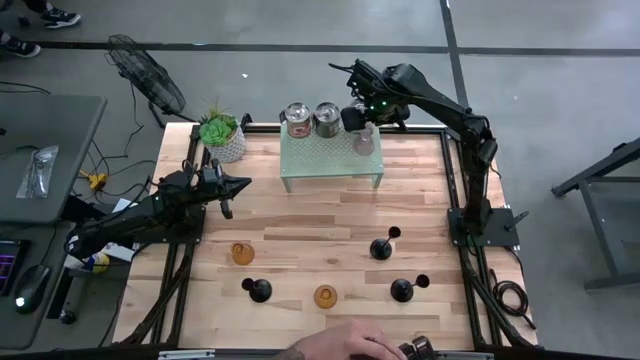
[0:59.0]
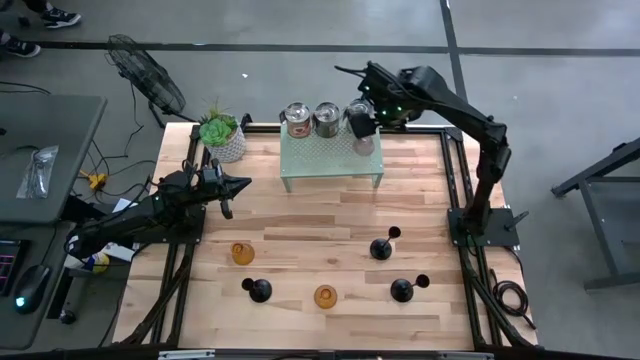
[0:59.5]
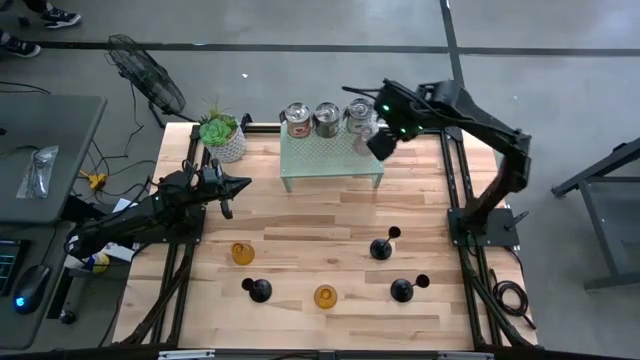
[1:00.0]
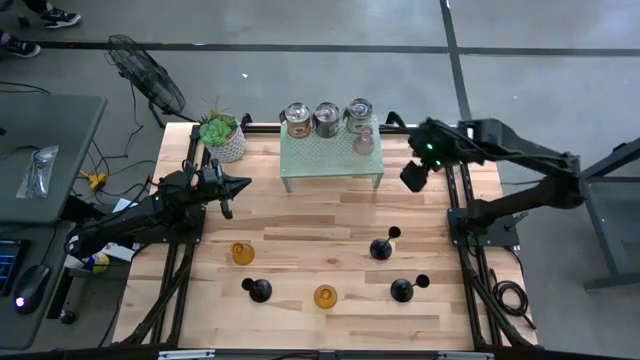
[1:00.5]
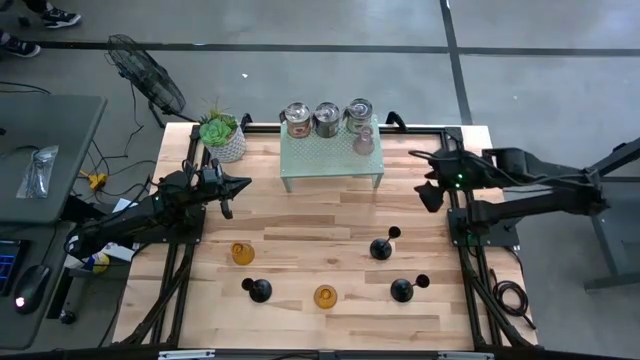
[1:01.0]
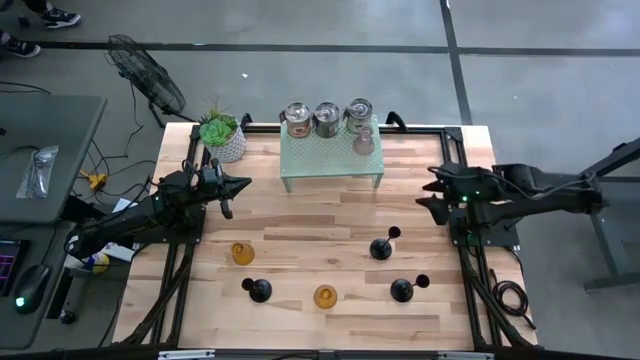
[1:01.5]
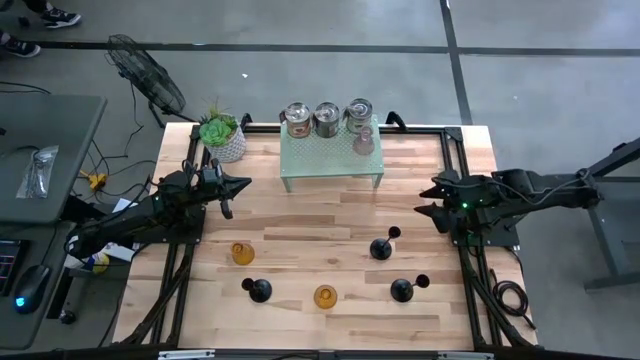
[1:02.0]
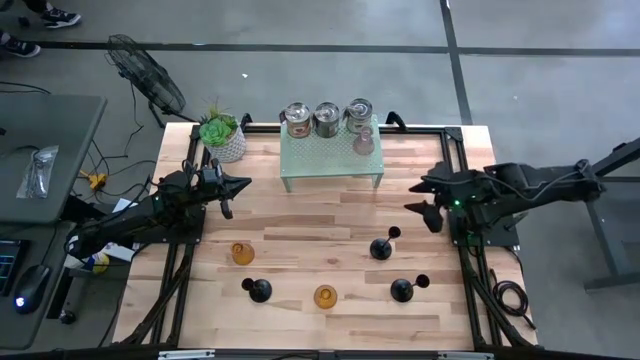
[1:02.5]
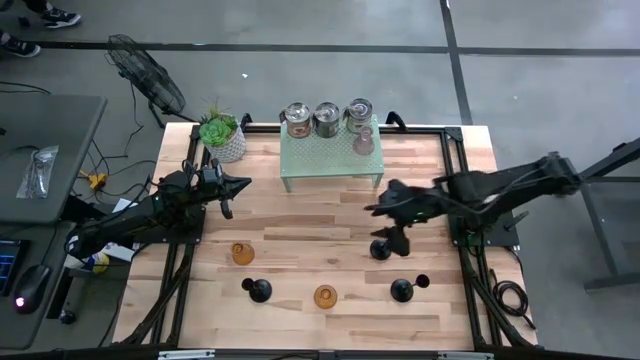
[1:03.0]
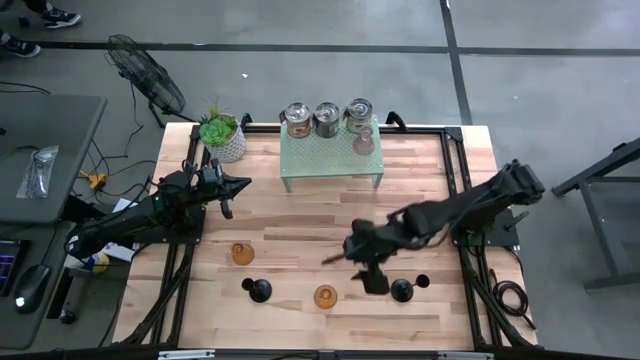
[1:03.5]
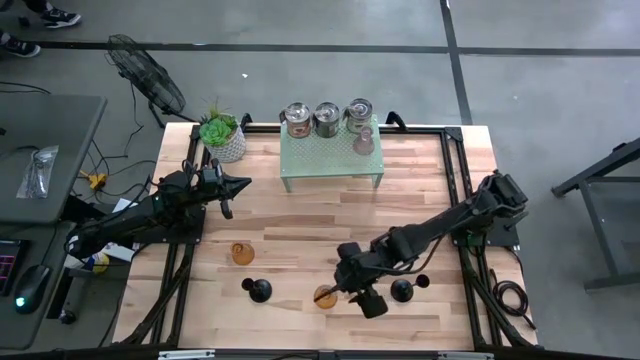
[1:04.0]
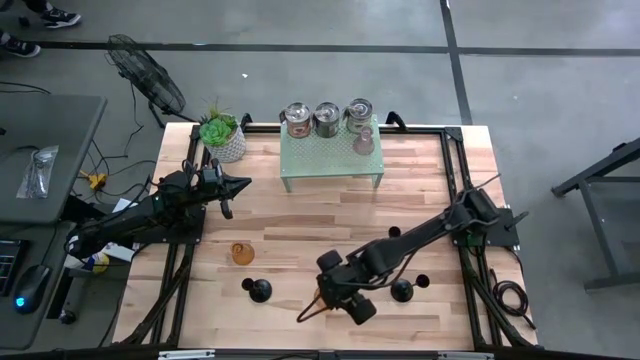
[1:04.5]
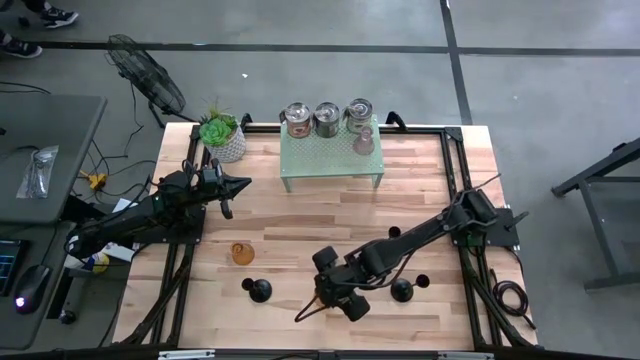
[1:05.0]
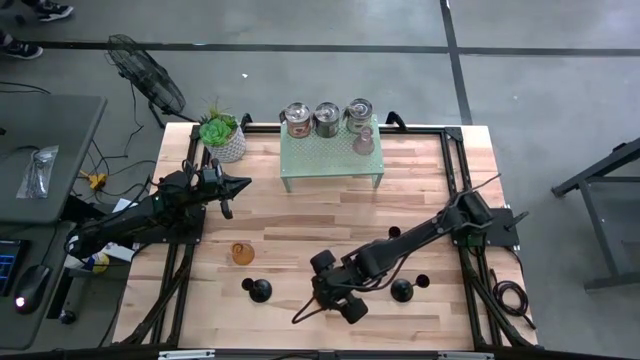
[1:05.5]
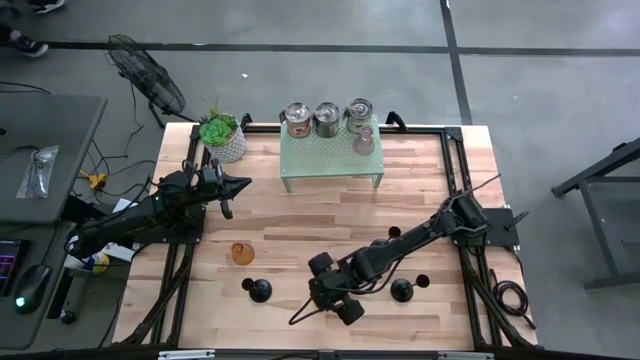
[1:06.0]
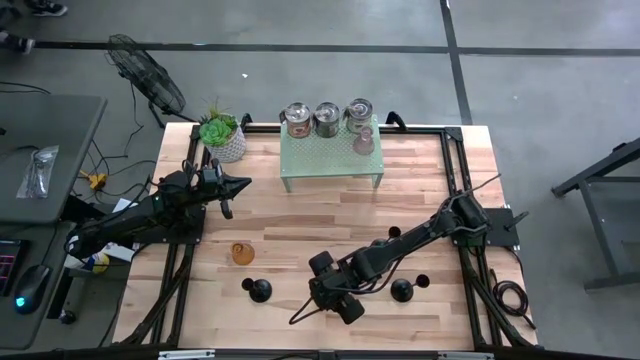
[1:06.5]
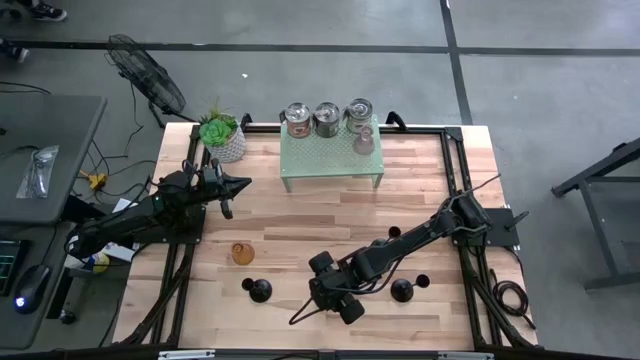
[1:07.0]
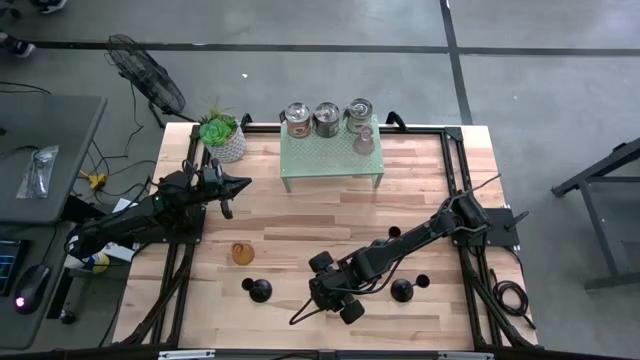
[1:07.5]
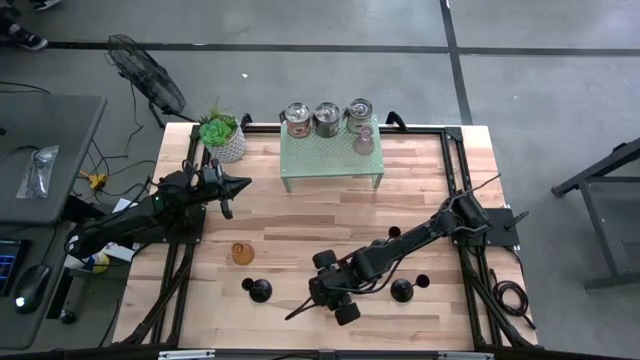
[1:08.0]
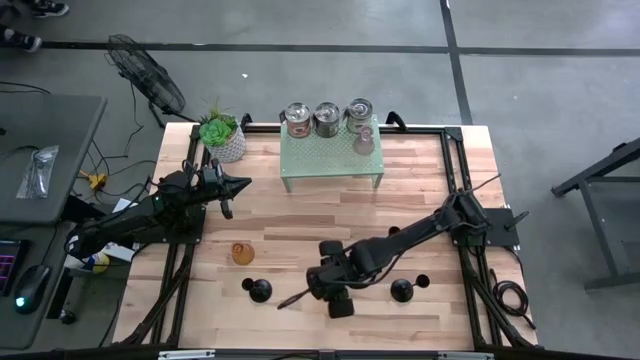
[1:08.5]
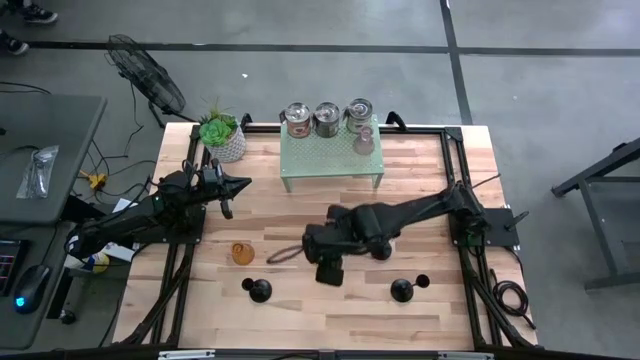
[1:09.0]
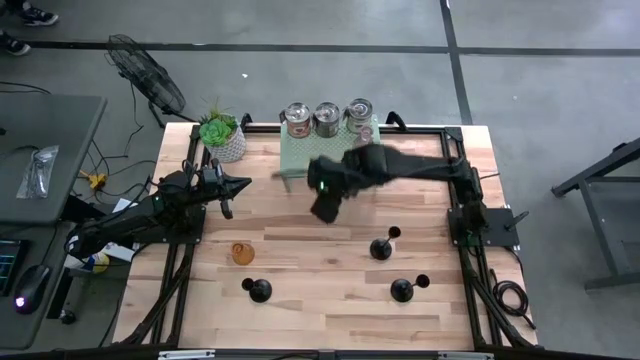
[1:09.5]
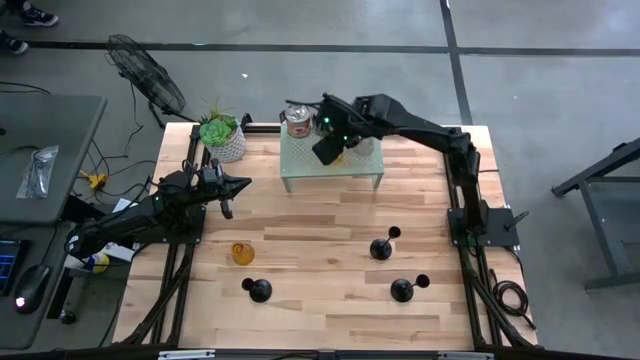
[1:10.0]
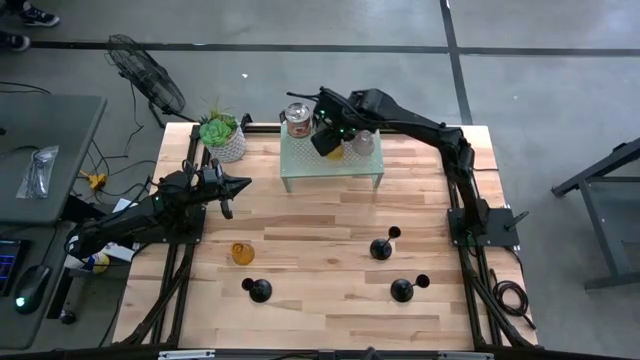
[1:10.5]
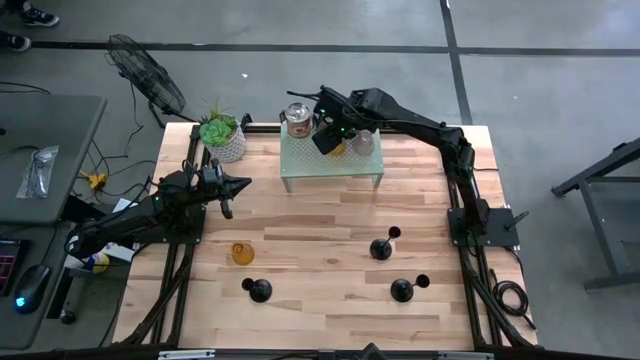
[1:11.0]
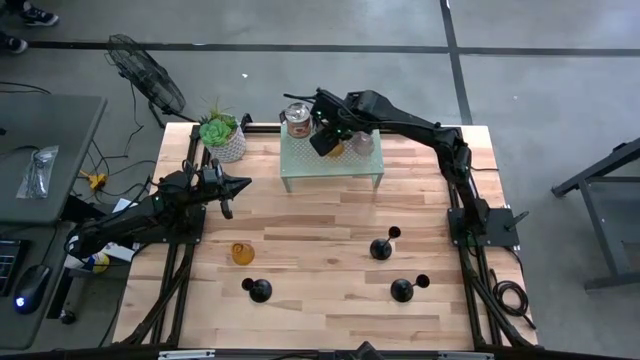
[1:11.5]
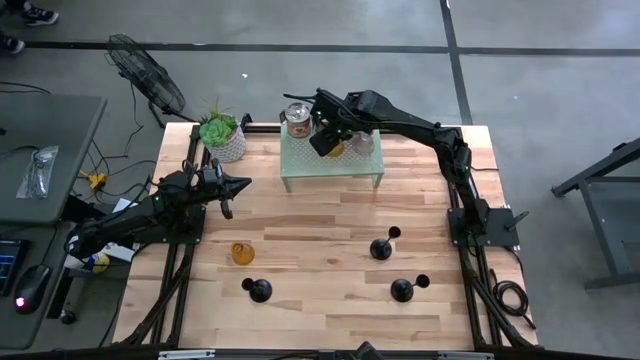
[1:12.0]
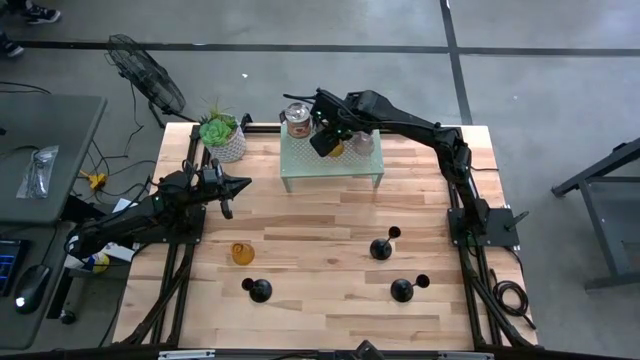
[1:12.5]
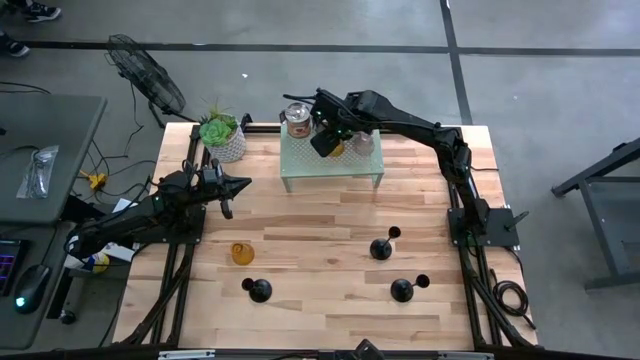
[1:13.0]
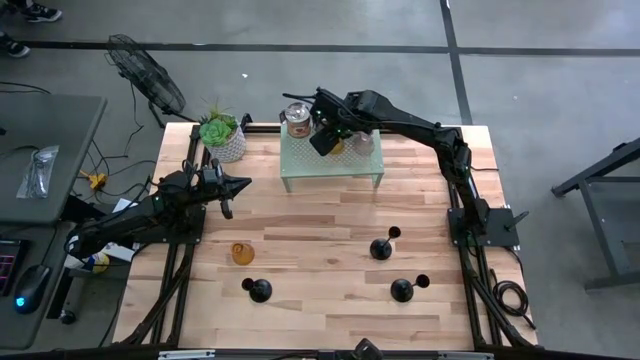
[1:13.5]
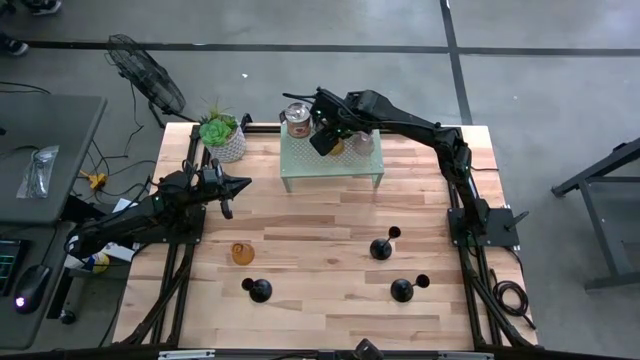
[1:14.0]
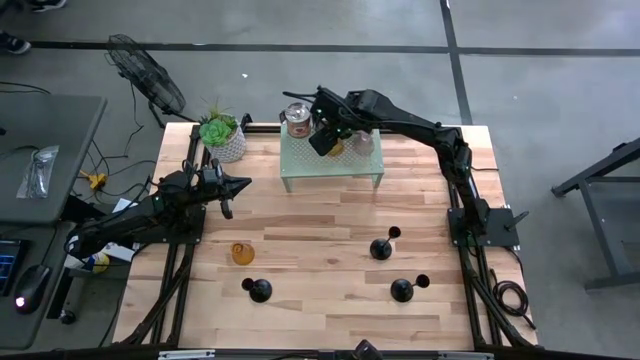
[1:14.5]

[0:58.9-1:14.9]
Task: Pick & Place candle stick holders
Put the right orange glass candle holder on the shelf

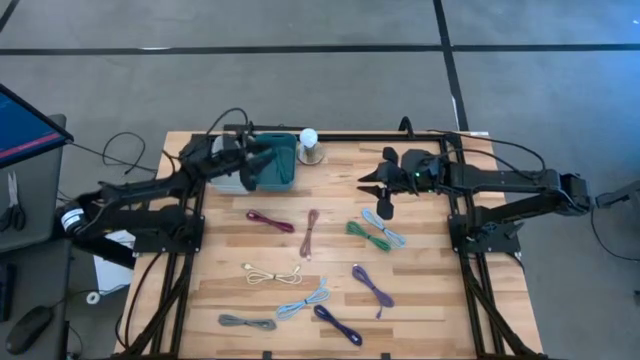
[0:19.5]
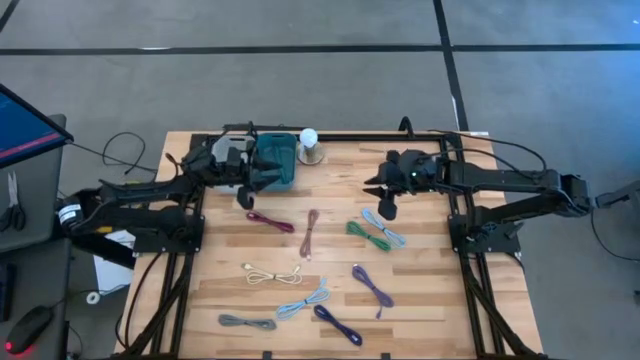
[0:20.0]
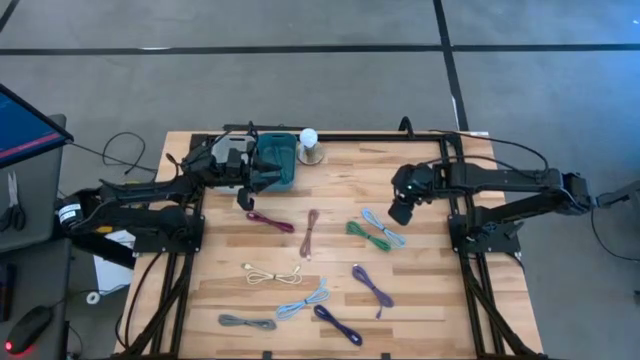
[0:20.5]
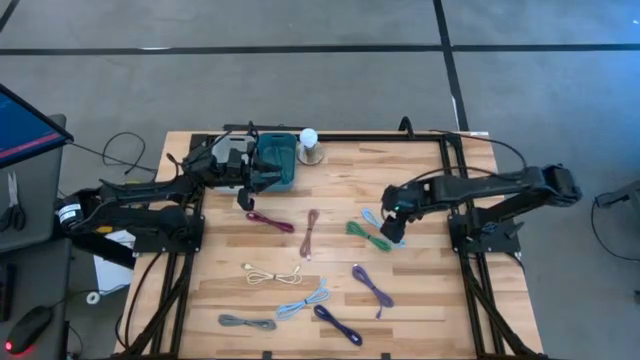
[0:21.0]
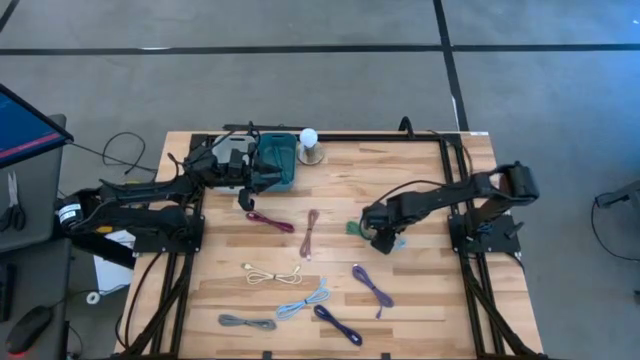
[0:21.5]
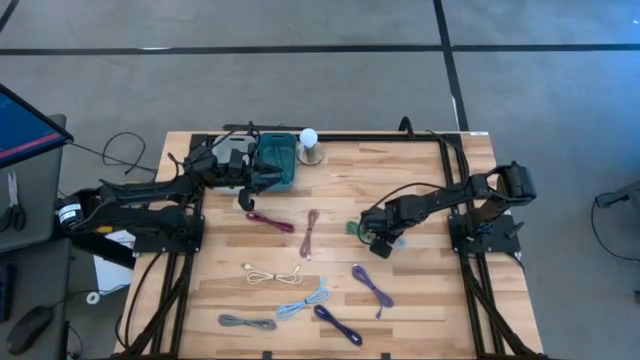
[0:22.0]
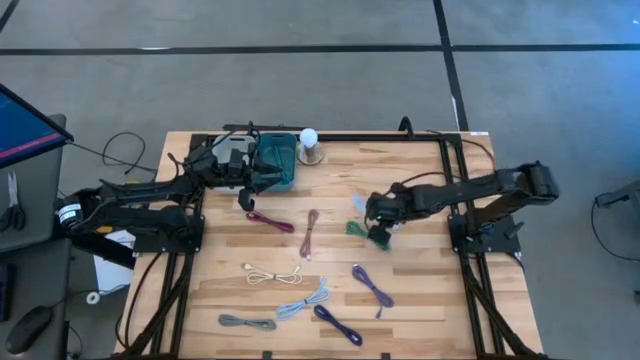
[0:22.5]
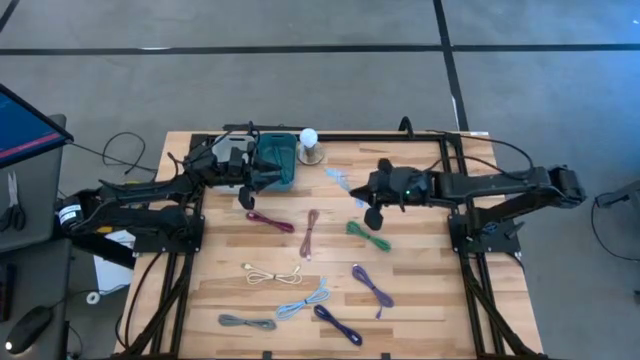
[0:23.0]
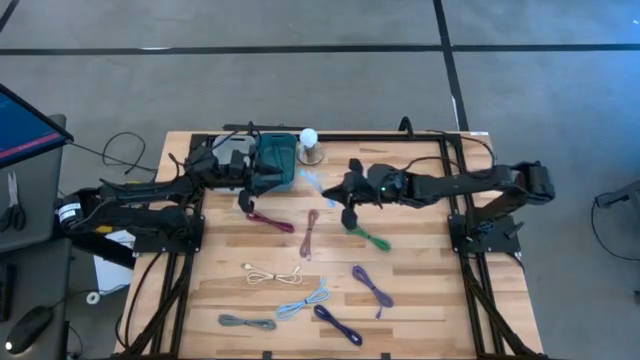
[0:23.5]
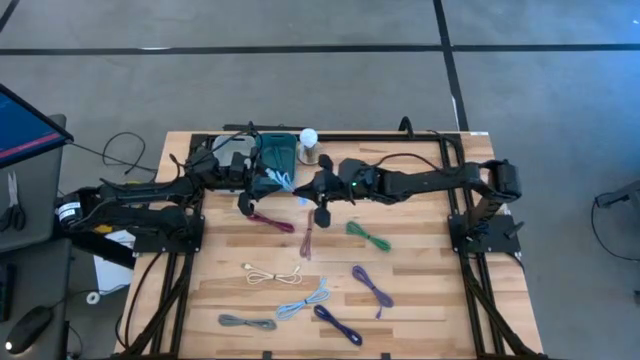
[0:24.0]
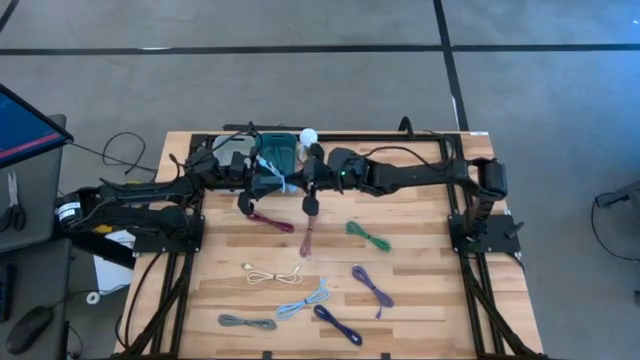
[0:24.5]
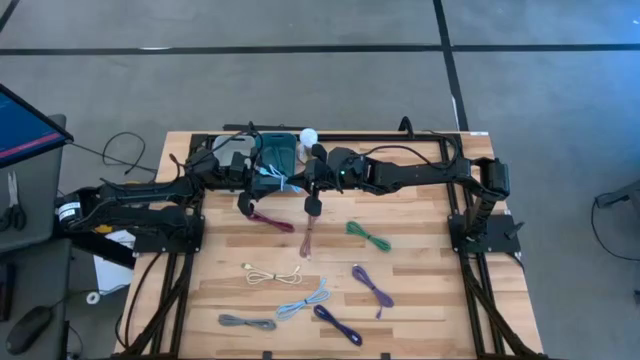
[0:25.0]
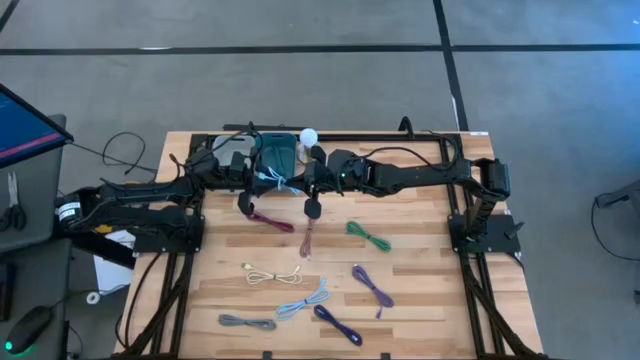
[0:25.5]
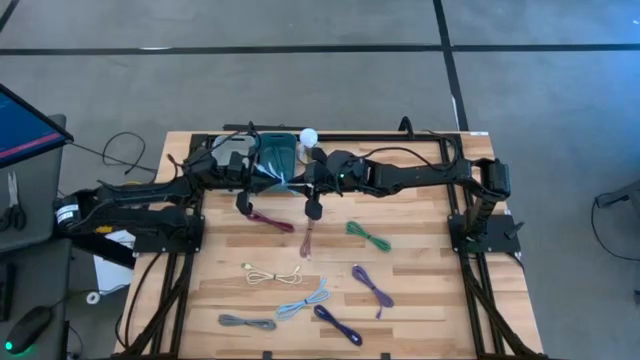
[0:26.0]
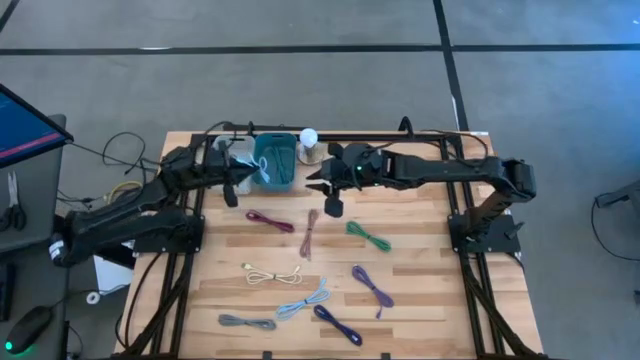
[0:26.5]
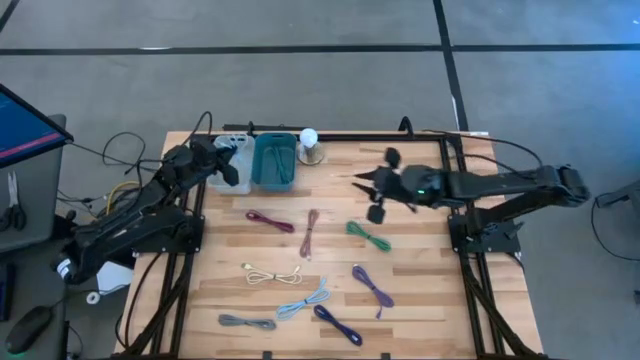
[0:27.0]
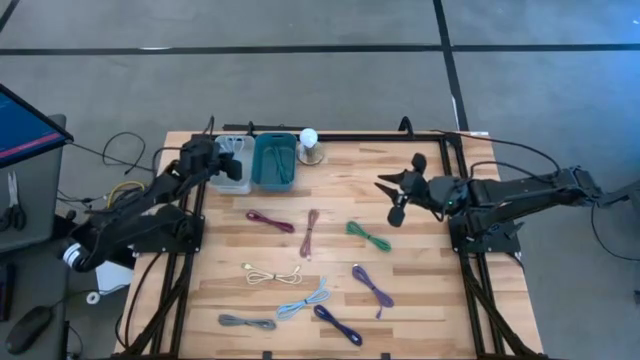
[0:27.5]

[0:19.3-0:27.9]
Task: Pick & Place USB Port
Put the light blue charger cable into the gray bin
